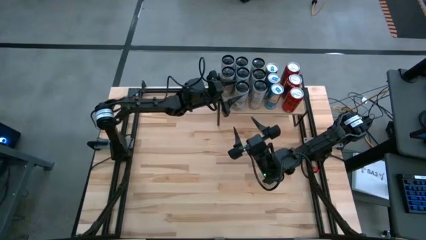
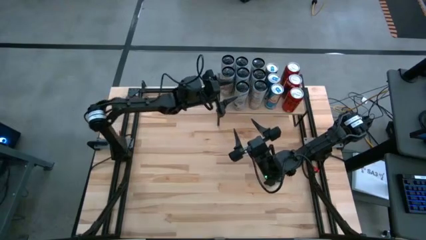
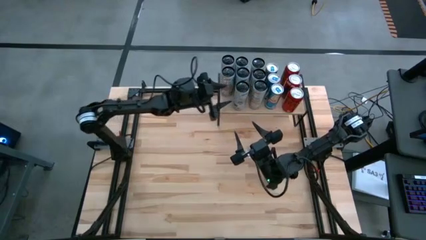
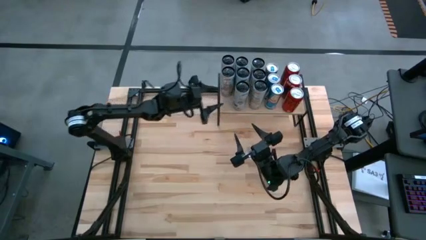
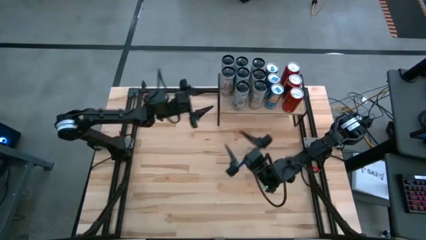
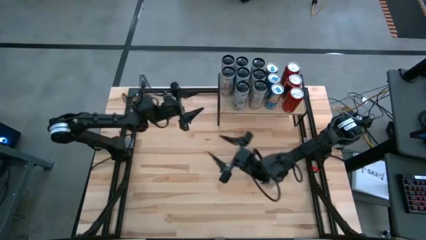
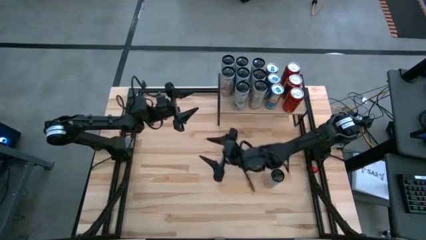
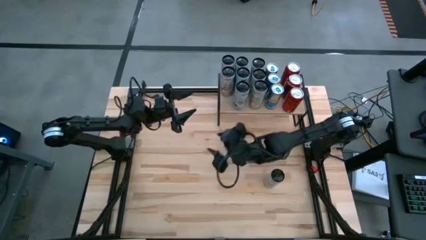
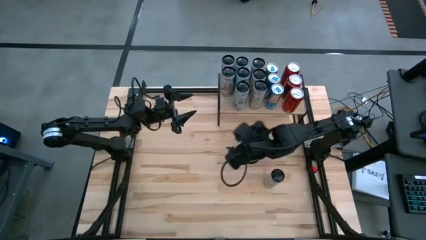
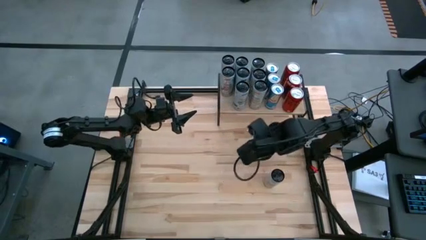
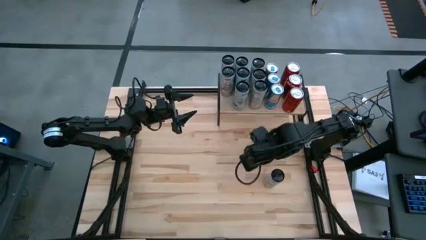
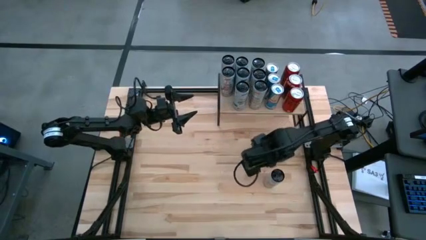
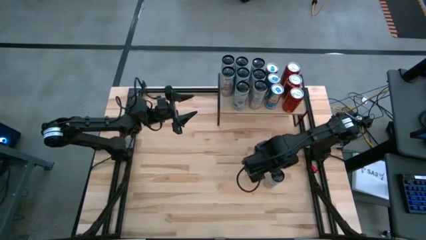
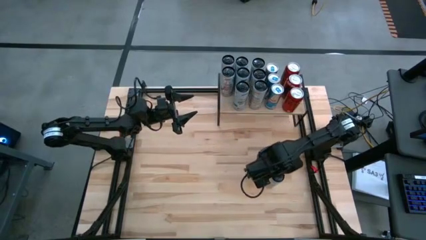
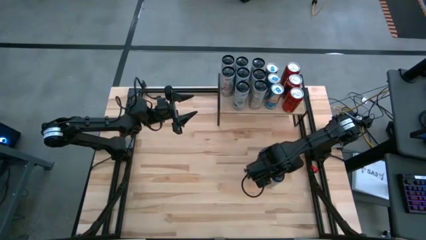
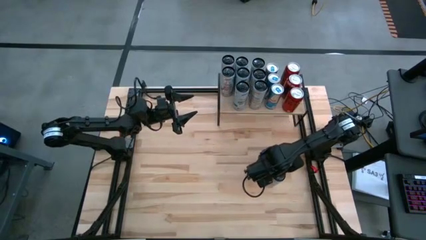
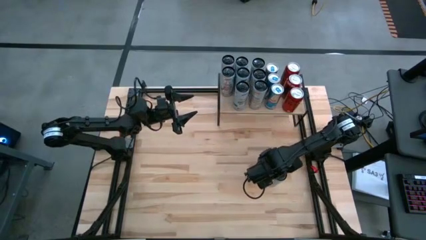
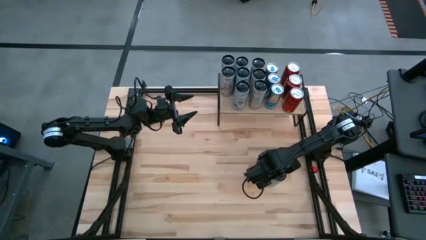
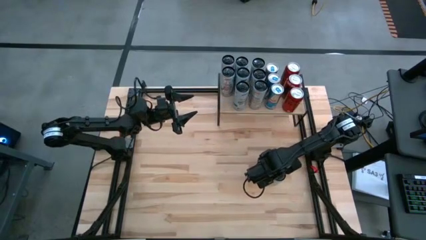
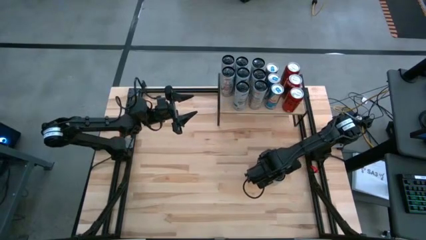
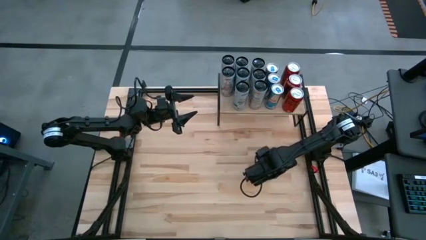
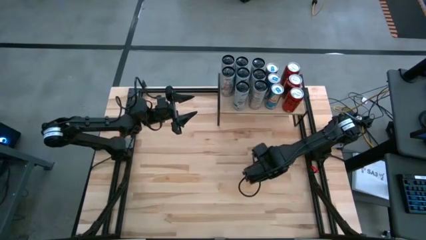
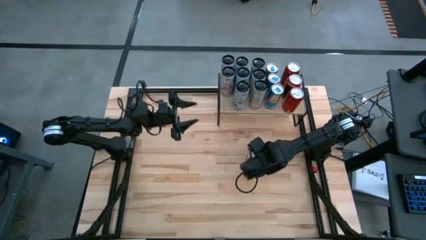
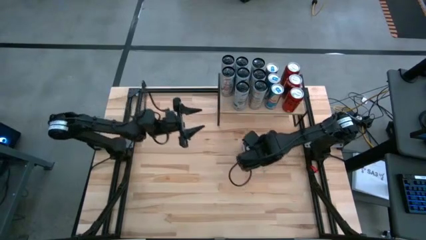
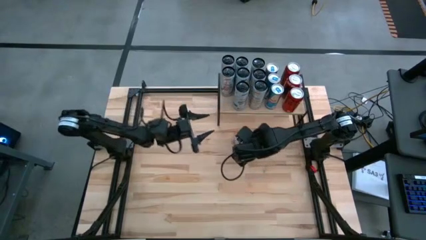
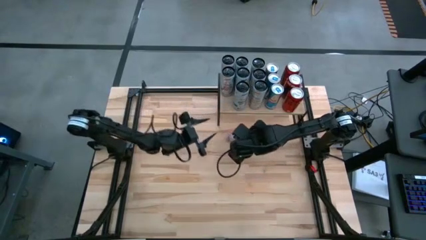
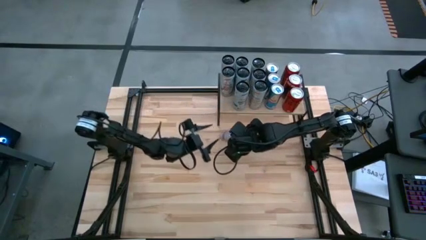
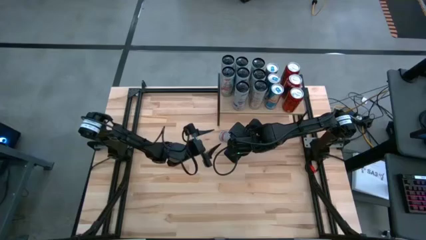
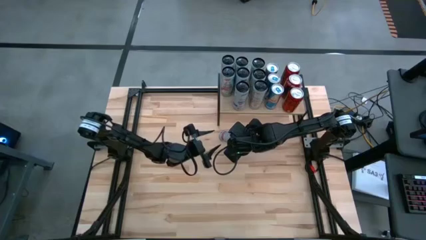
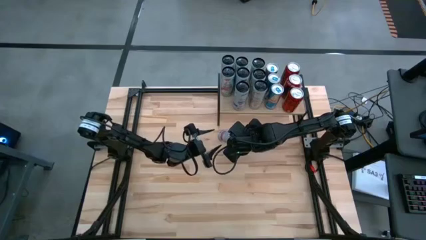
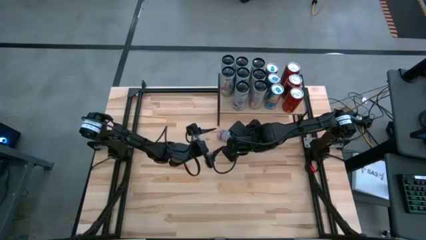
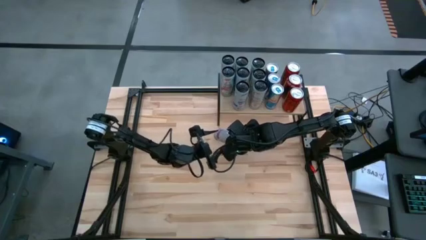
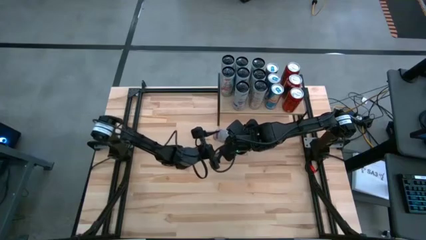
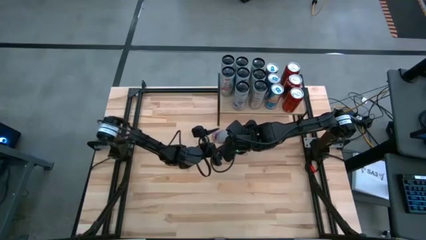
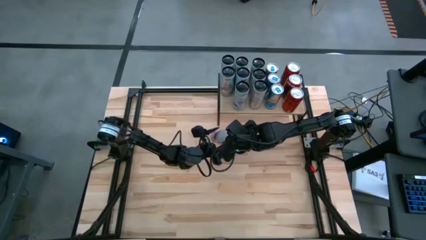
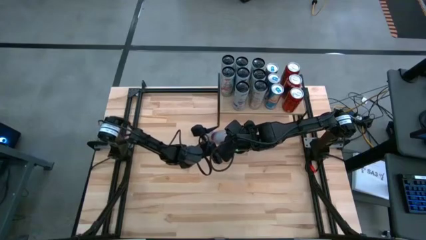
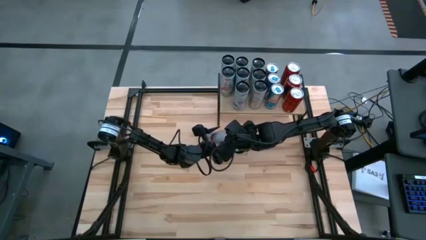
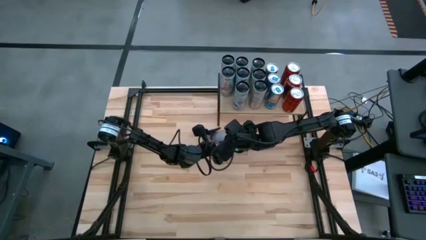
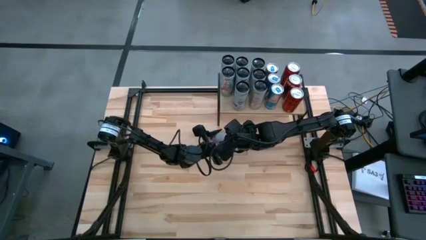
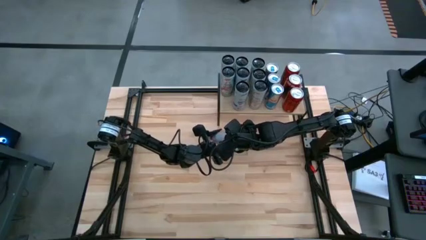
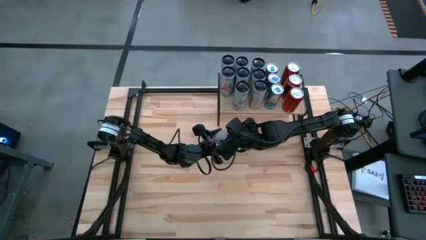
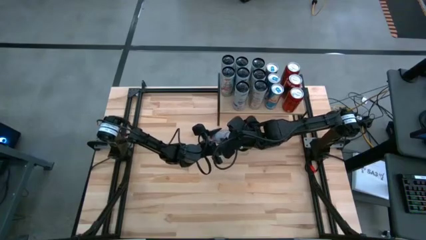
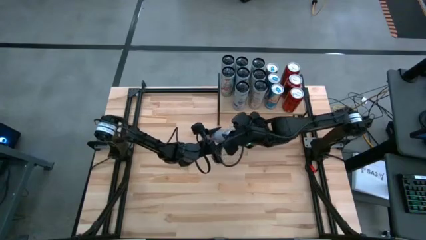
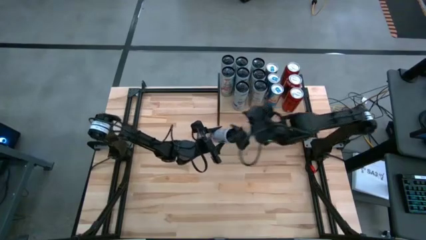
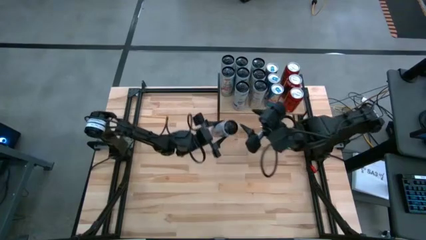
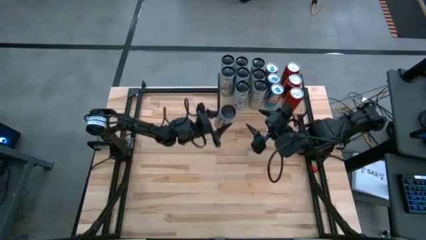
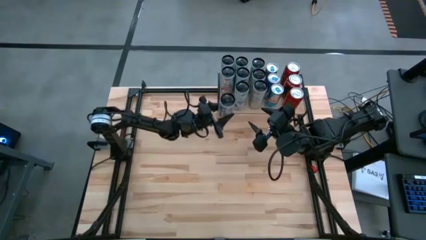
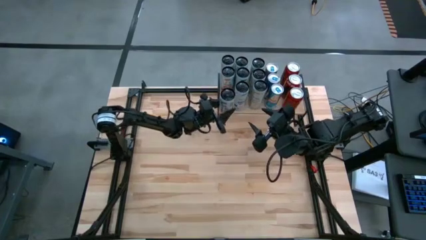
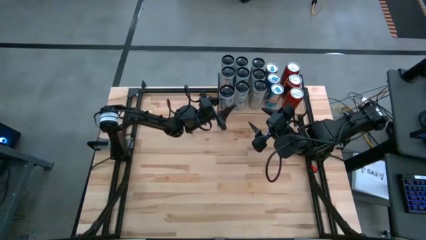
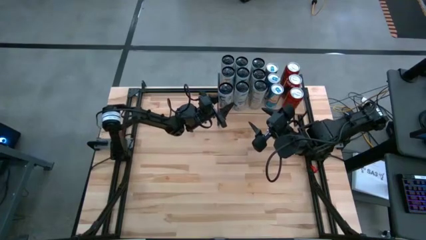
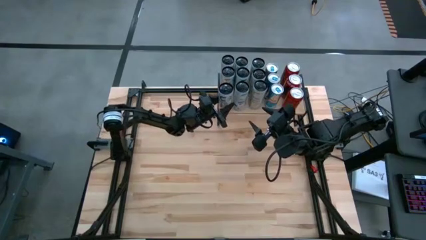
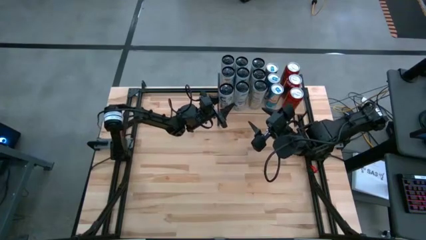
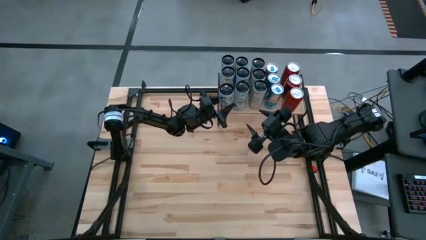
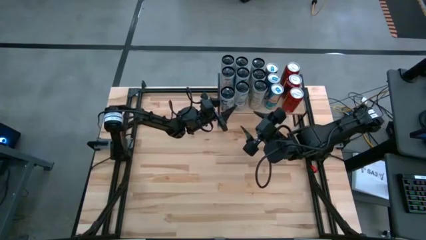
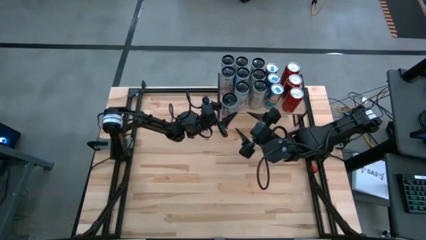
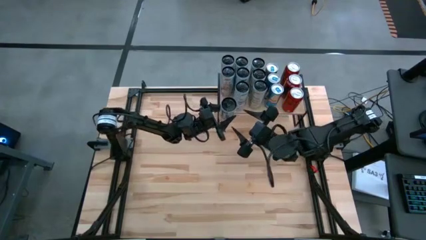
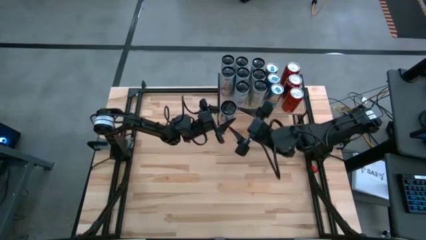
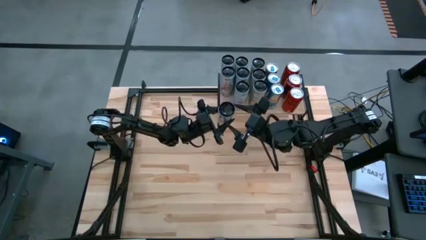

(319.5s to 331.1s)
Task: Place canned beverage on shelf
Put the white pink soda can on the shelf aligned with the other white pink soda cans

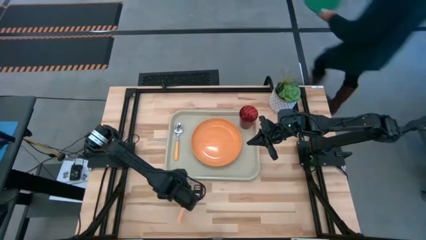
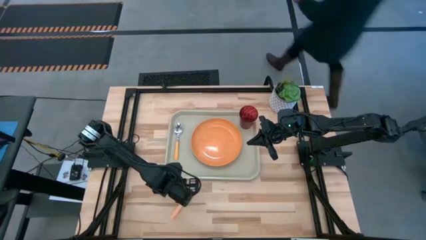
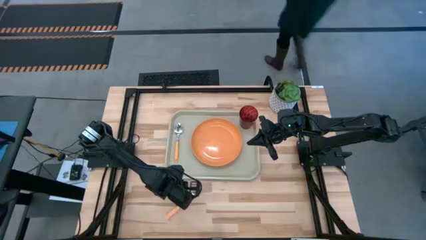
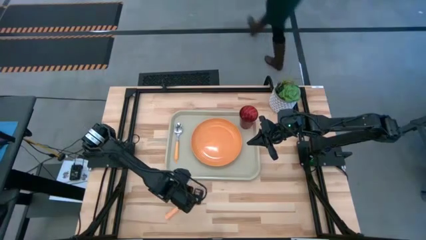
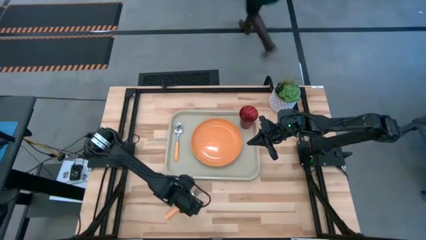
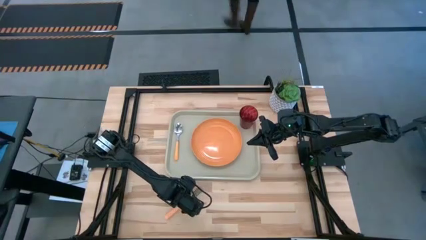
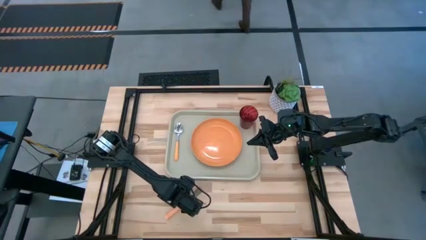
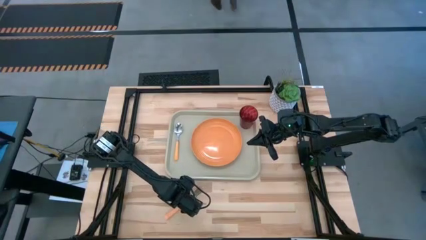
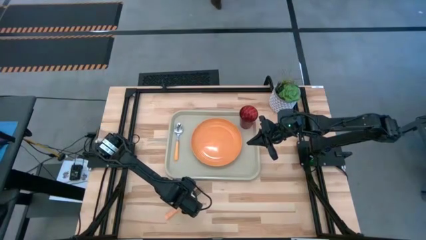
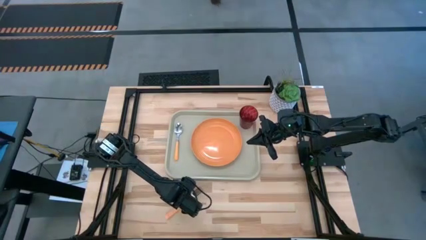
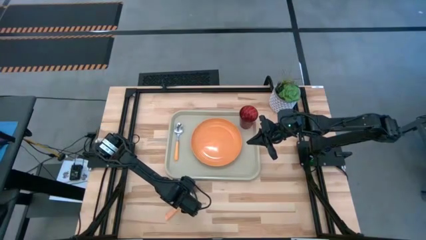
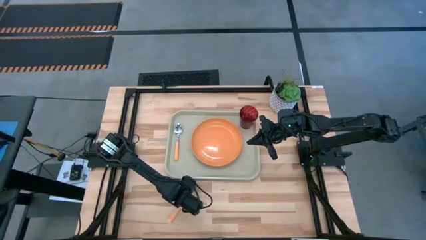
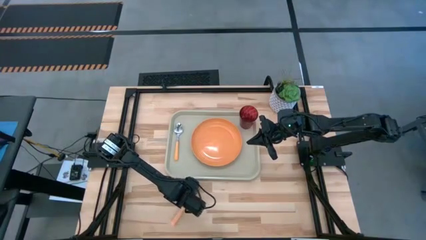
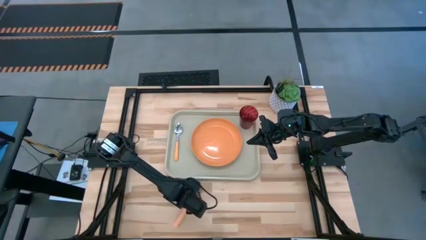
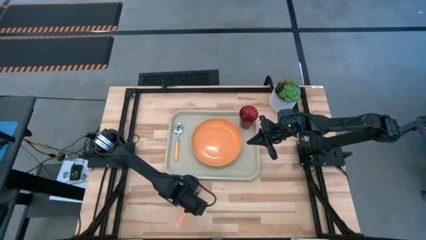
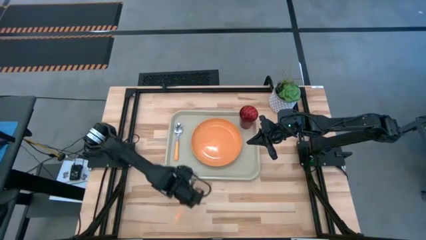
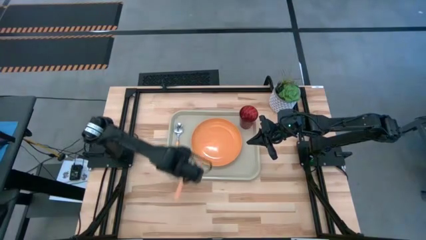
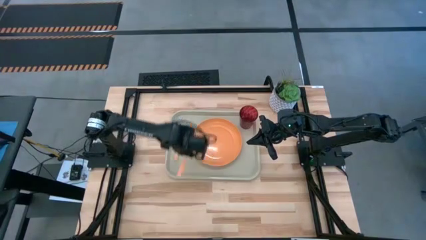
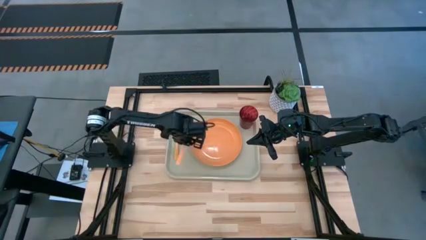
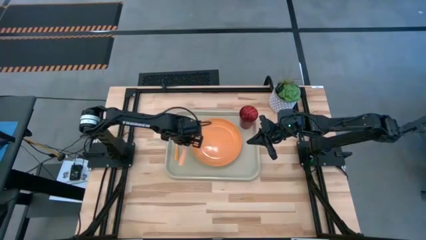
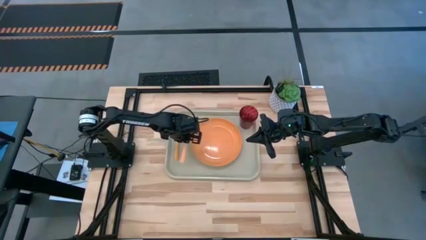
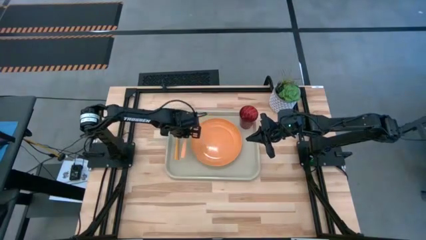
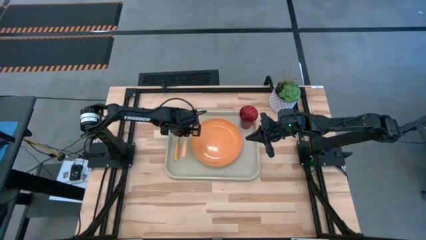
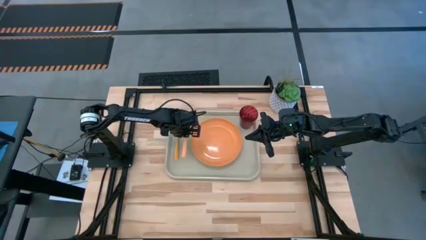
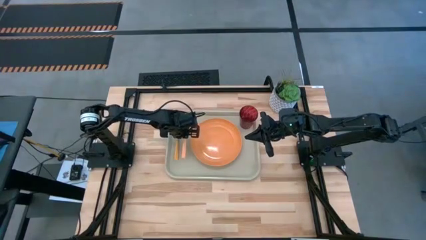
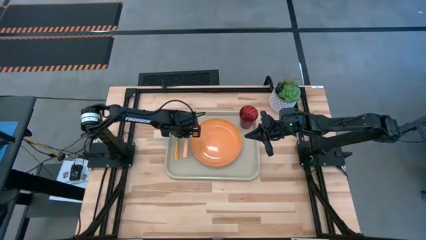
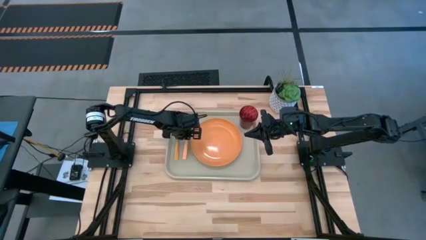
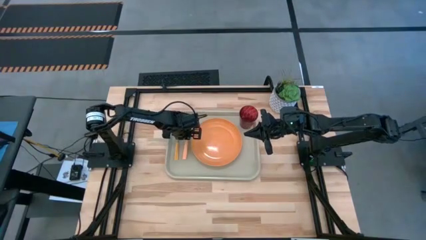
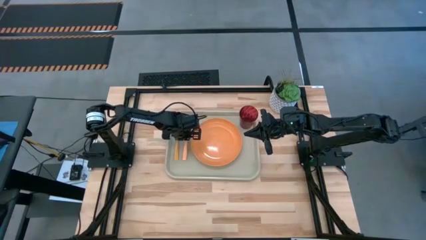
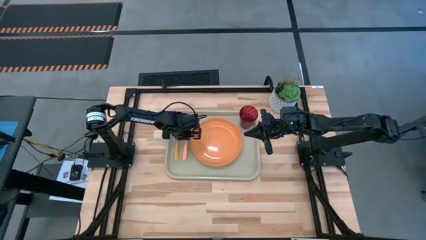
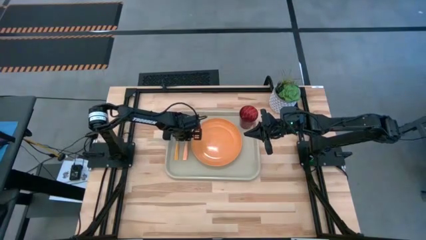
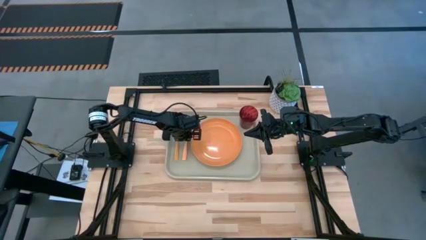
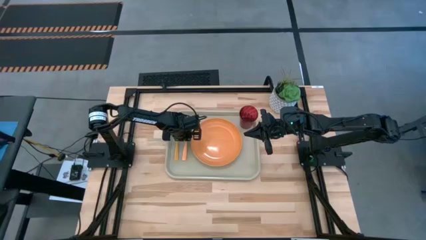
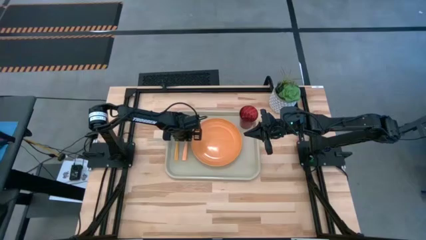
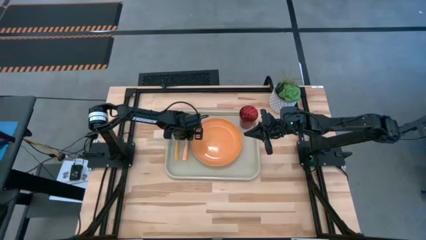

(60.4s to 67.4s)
Task: Pick and place plate/cup/fork/spoon on tray
Put the light orange fork to the right of the orange spoon on the gray serving tray
